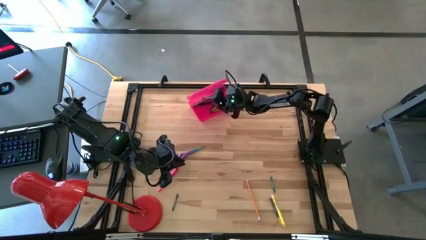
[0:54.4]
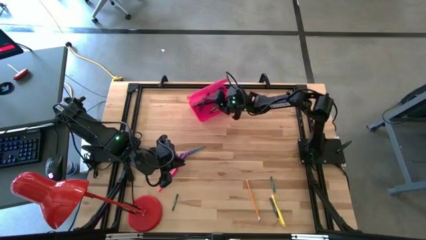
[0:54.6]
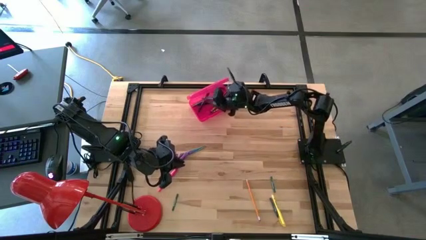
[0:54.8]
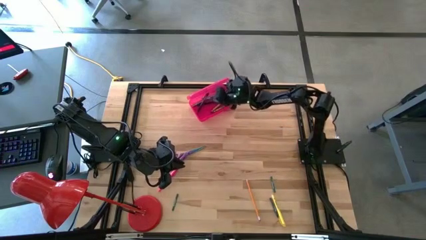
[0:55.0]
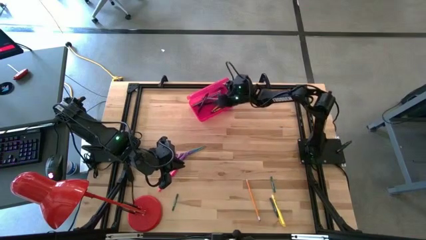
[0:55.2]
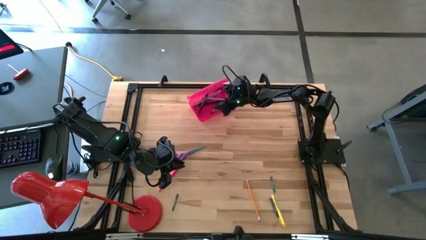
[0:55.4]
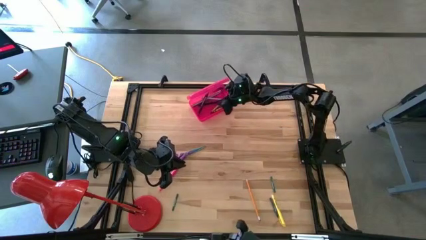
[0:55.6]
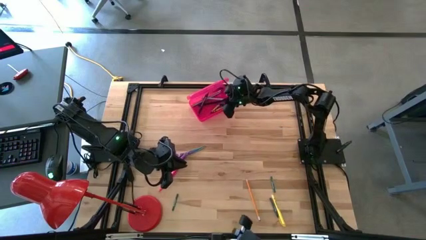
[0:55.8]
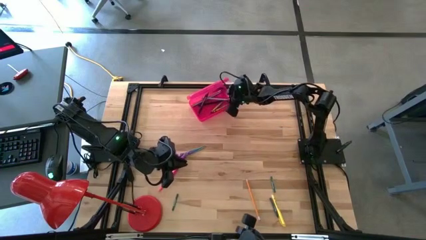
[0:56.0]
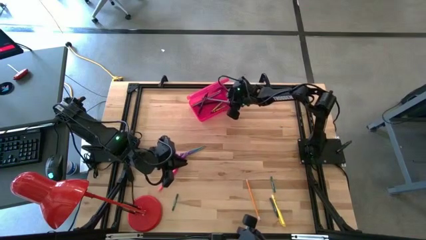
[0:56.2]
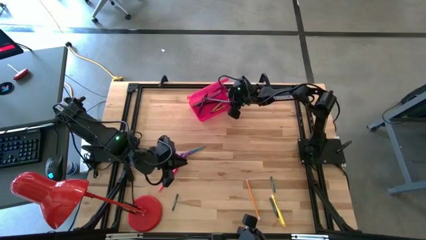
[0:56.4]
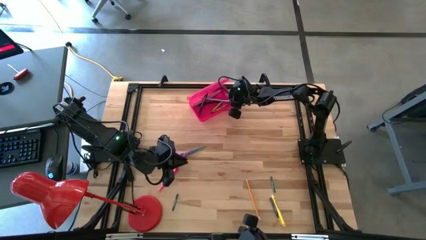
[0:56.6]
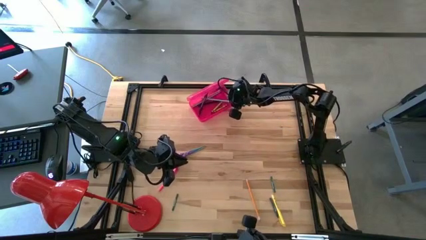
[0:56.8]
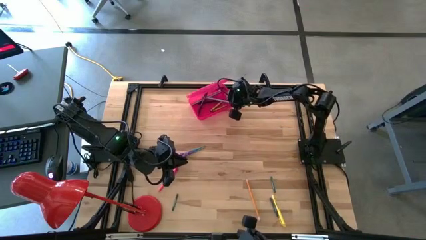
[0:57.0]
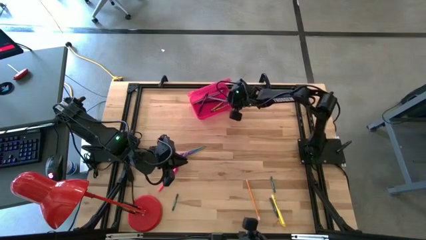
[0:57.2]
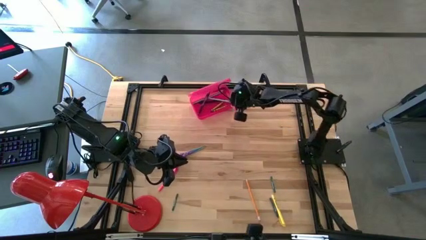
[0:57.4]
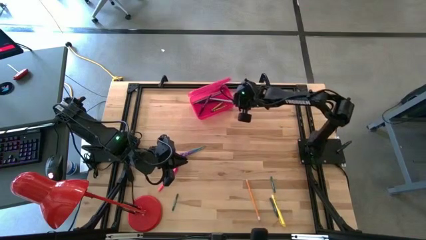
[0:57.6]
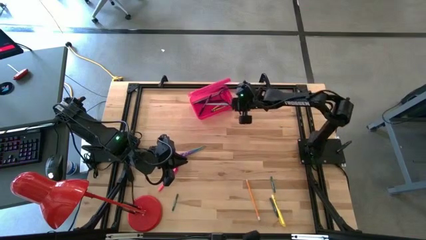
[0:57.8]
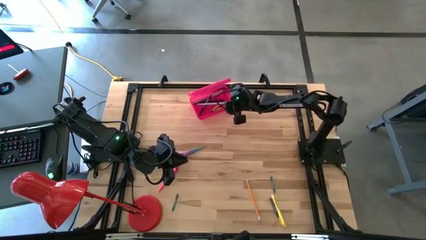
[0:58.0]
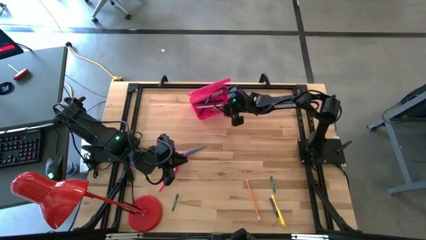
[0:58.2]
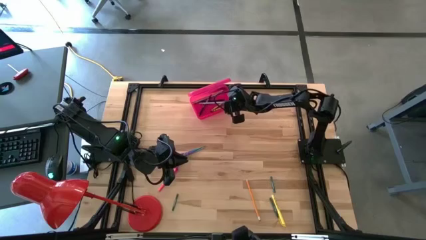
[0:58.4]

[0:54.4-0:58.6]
Task: Pick & place school supplies into a supply box
Adjust the blue pencil

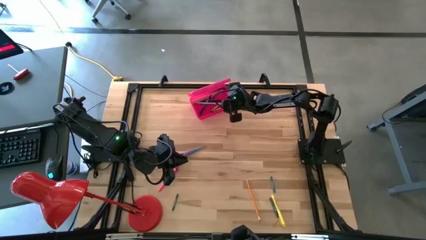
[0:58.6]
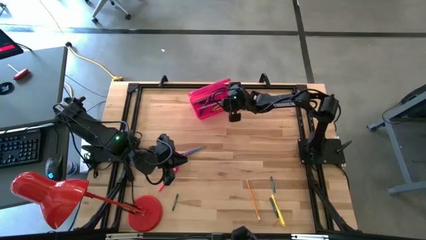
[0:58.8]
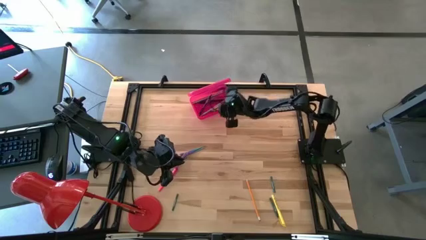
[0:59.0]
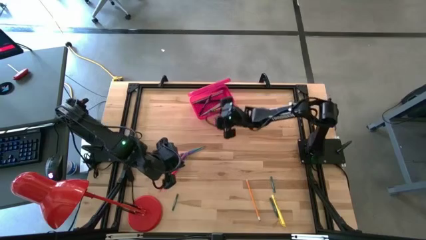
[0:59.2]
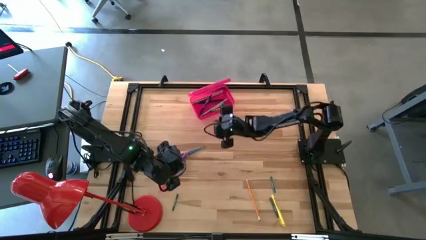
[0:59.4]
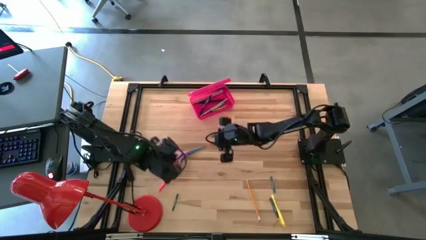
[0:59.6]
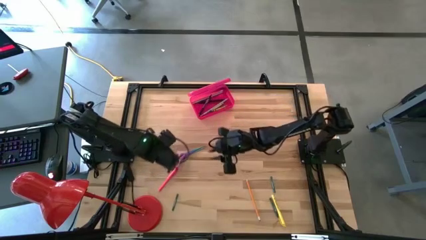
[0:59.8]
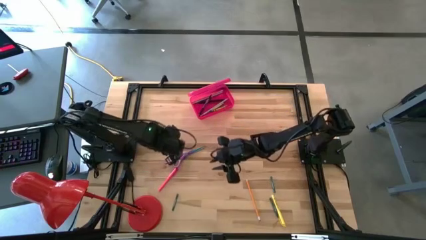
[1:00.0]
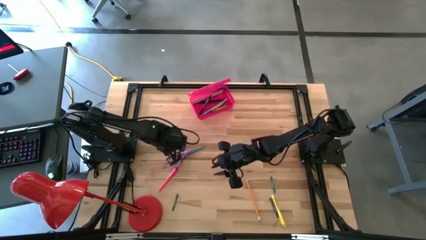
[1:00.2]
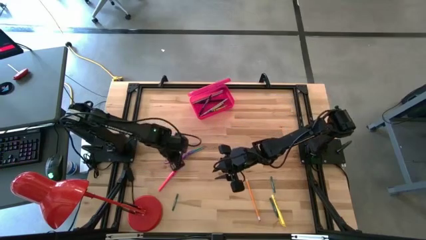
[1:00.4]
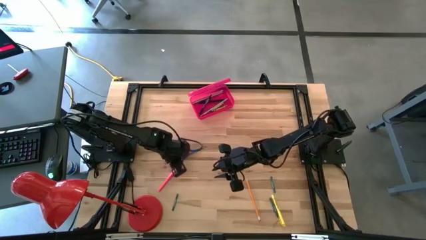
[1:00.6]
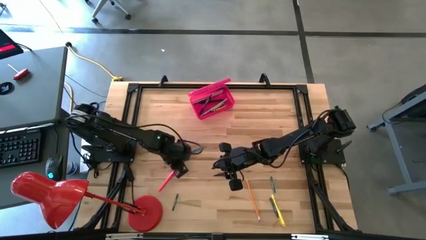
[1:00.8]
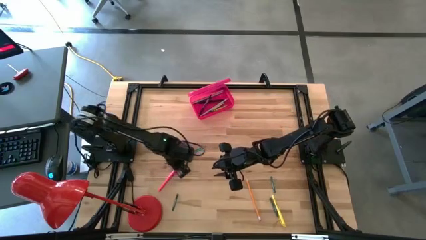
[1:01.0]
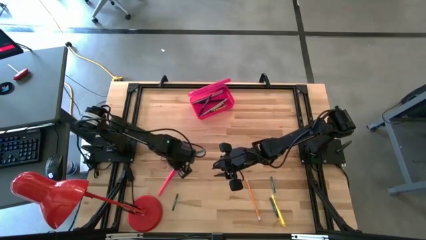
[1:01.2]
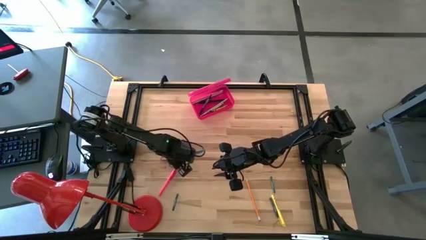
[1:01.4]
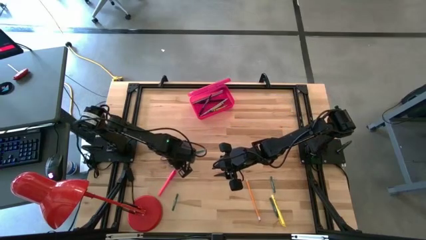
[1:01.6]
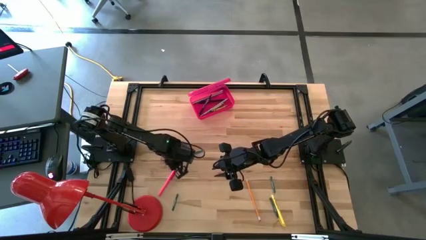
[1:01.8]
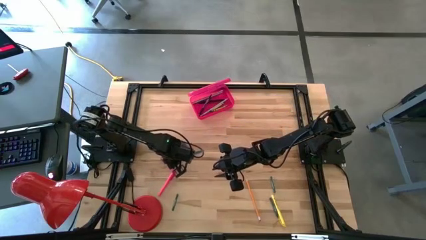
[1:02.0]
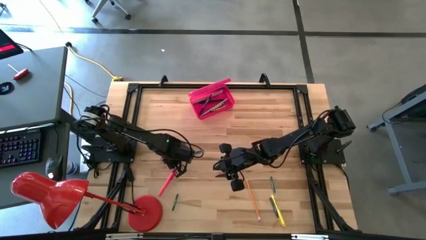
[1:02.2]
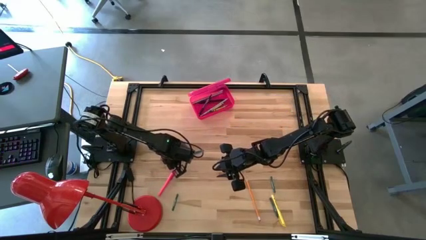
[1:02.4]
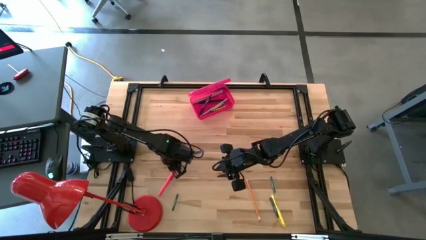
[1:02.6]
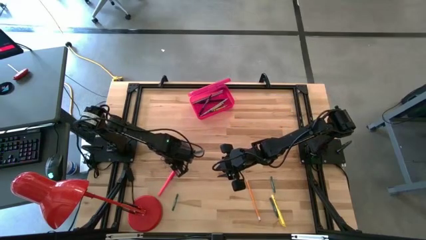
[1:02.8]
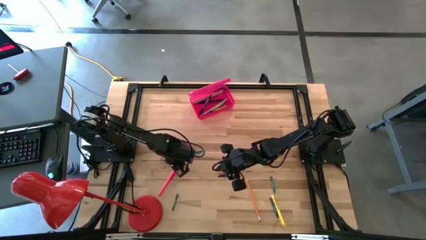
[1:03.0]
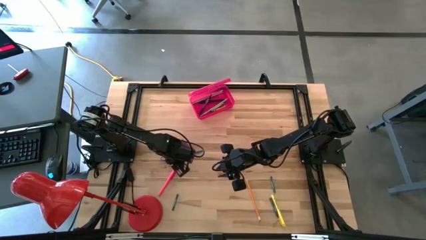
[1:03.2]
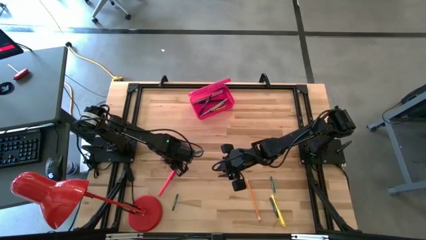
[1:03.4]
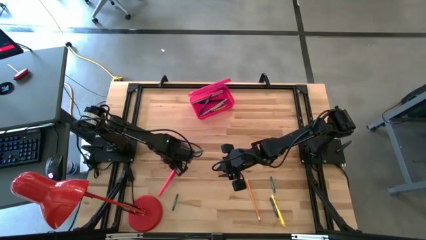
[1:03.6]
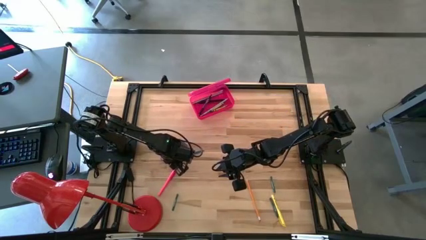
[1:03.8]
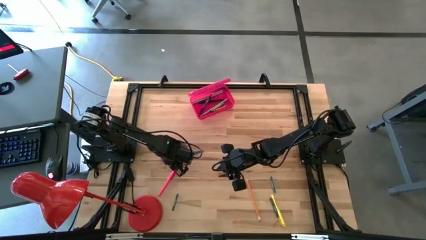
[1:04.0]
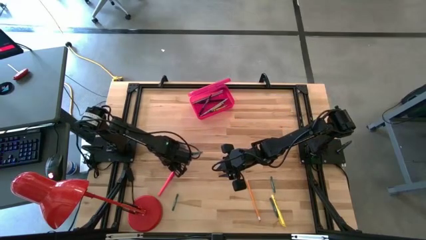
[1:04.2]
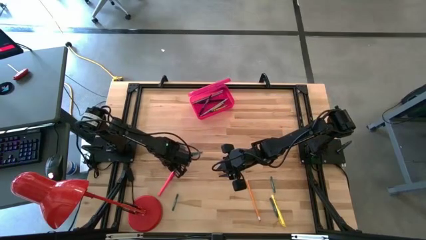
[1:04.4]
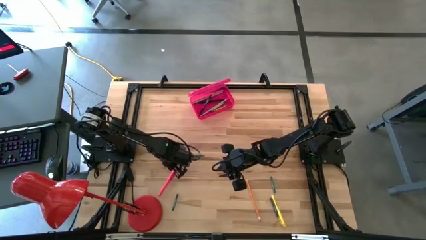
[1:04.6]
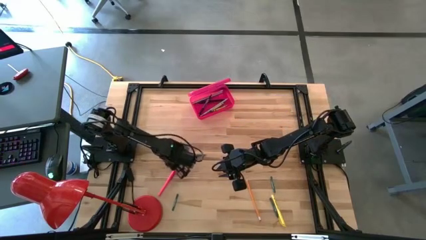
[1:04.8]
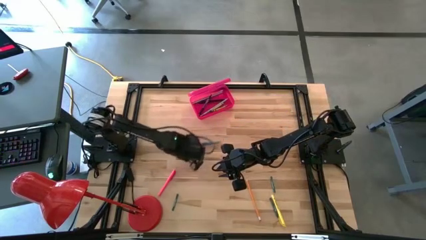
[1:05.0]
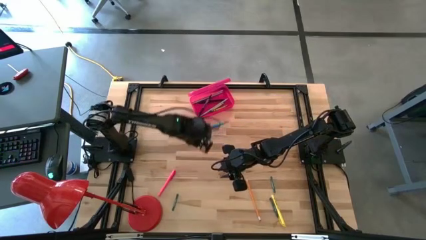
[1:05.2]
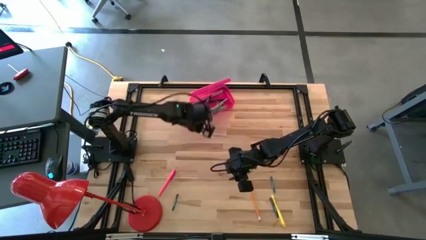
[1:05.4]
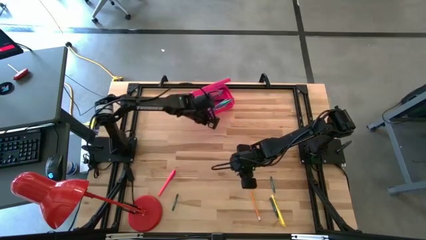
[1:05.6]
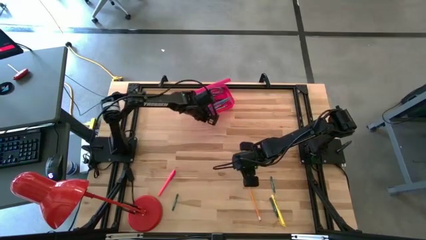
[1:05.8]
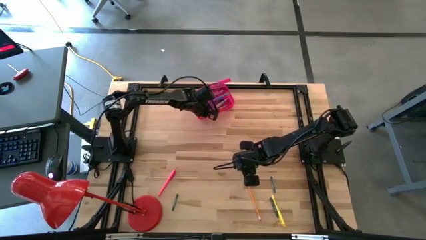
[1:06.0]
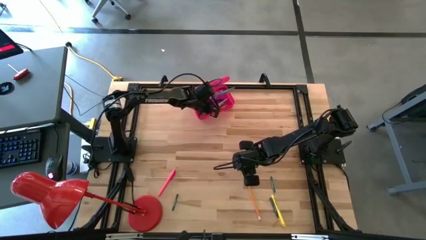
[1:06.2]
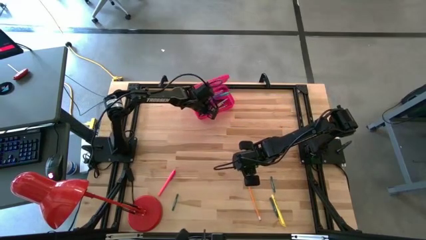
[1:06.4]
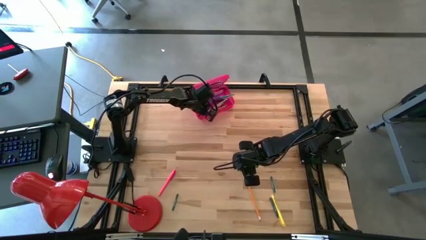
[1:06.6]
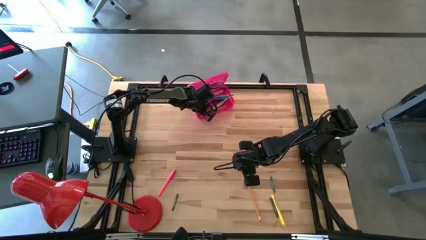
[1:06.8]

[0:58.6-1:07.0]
Put the violet scissors into the pink supply box

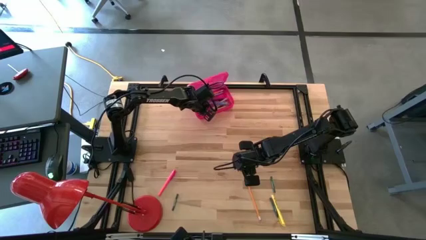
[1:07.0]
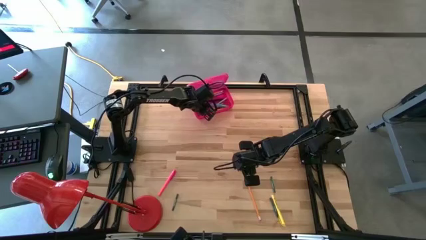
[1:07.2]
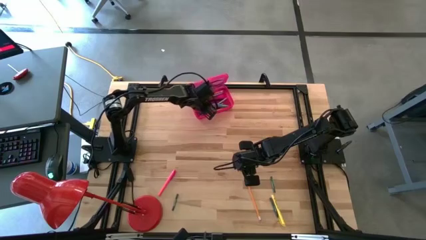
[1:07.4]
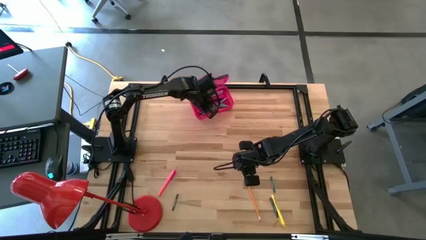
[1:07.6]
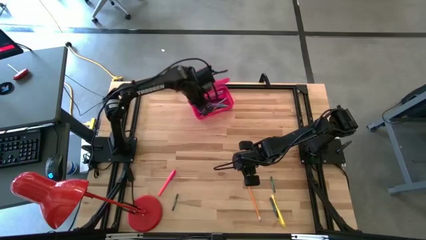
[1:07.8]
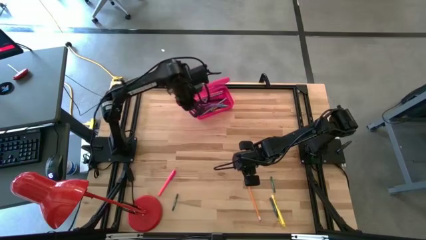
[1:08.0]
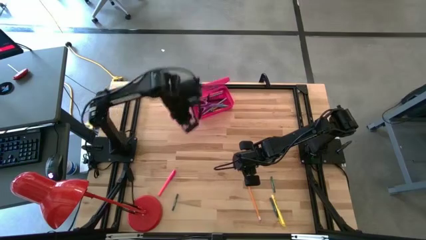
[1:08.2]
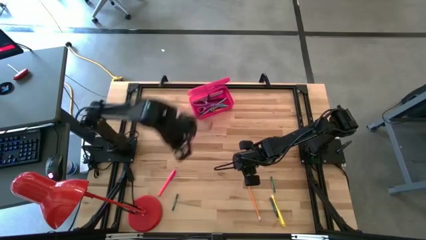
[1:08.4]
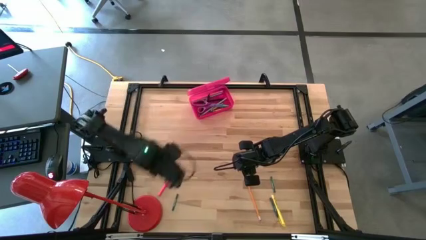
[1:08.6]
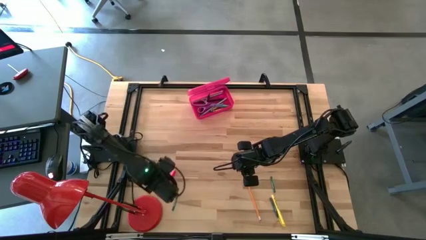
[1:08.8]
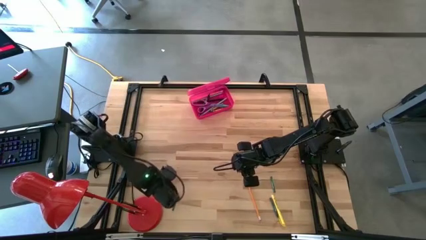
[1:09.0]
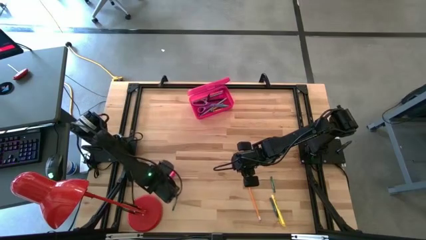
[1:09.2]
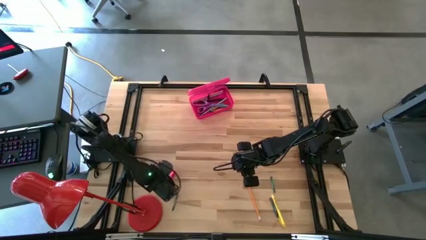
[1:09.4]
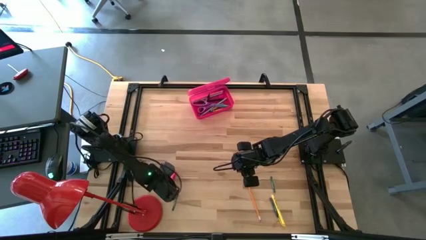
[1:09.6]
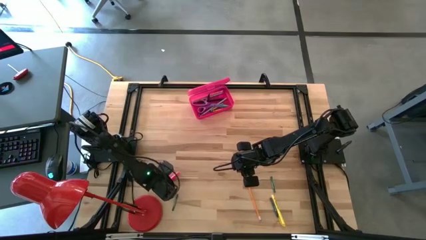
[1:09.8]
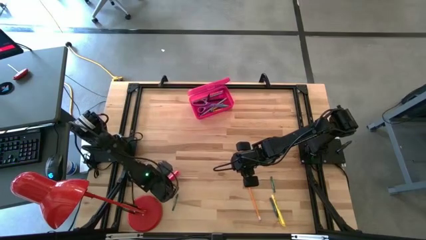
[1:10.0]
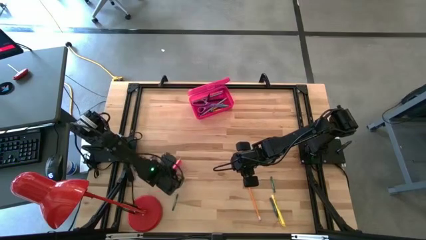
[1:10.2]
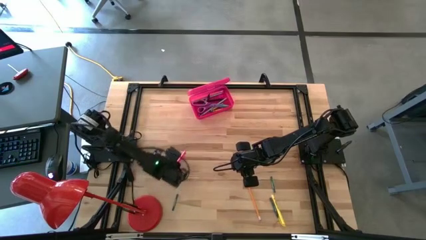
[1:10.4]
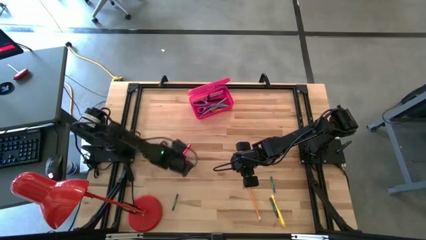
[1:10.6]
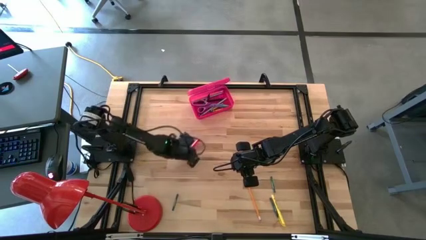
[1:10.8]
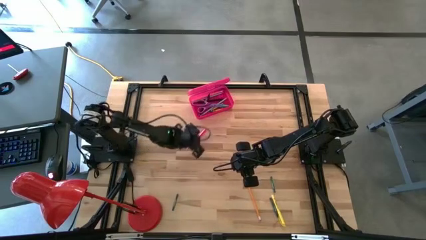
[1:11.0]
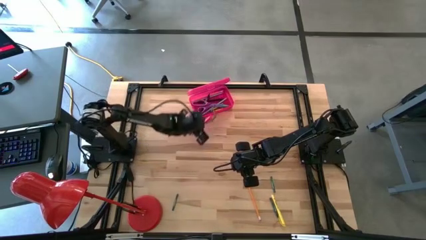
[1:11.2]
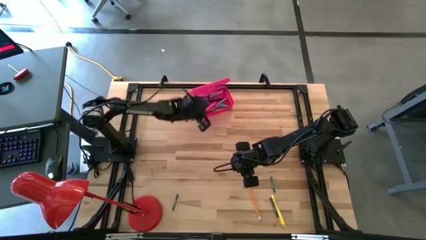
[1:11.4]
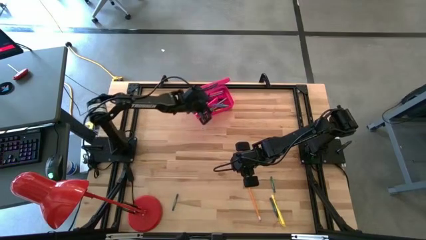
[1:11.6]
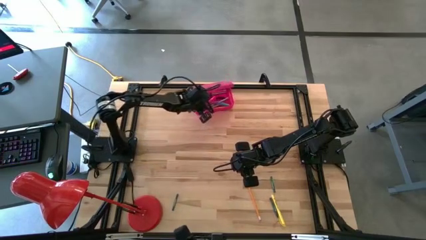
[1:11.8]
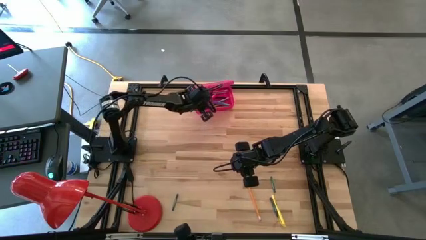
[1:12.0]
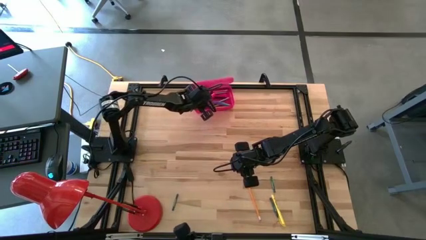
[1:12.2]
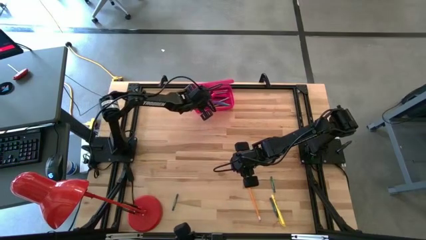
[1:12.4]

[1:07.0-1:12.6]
Put the pink pen into the pink supply box
